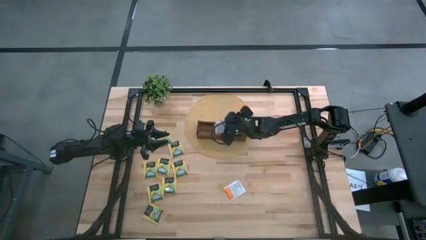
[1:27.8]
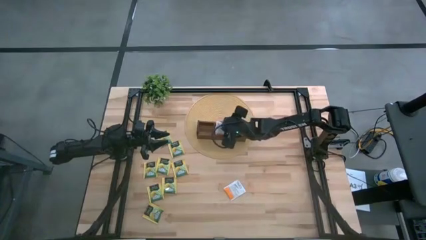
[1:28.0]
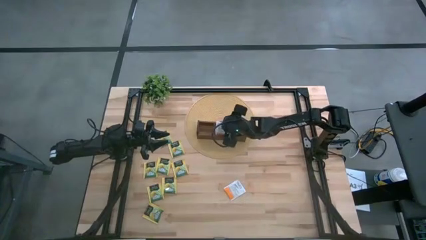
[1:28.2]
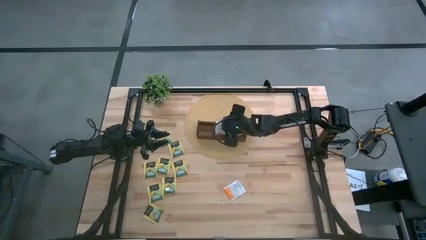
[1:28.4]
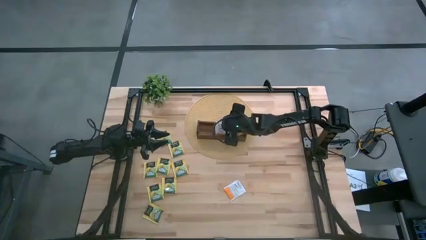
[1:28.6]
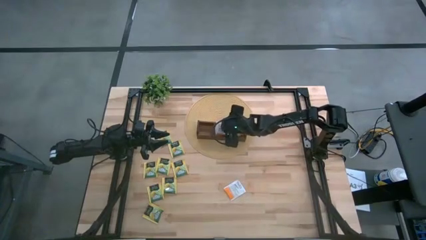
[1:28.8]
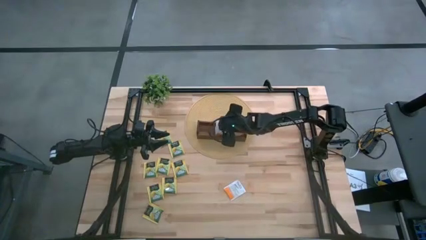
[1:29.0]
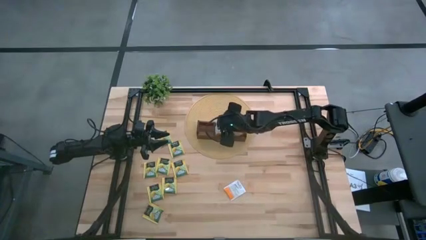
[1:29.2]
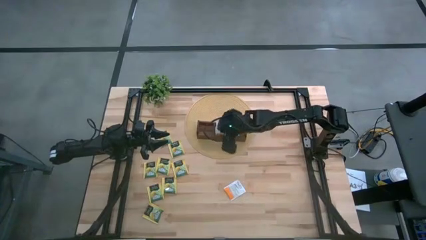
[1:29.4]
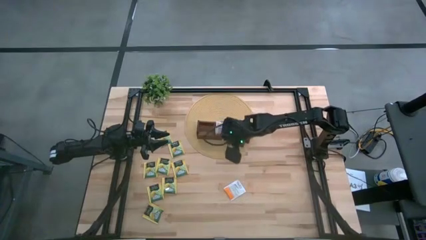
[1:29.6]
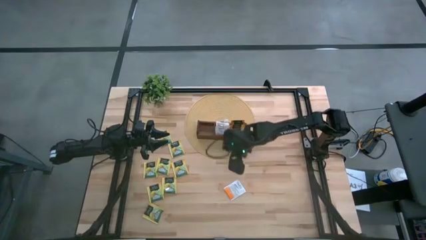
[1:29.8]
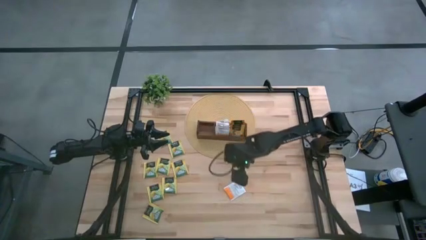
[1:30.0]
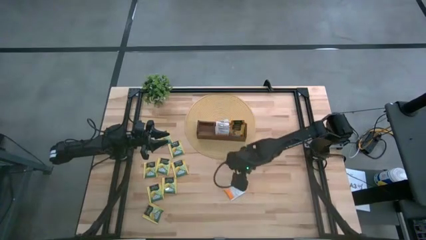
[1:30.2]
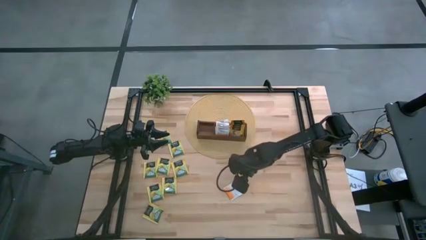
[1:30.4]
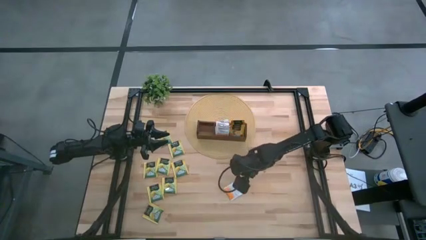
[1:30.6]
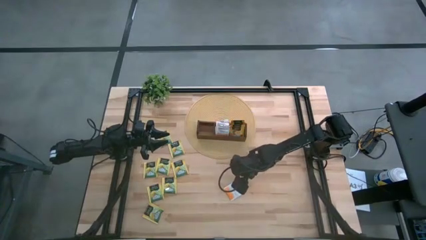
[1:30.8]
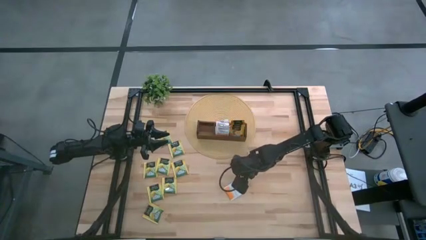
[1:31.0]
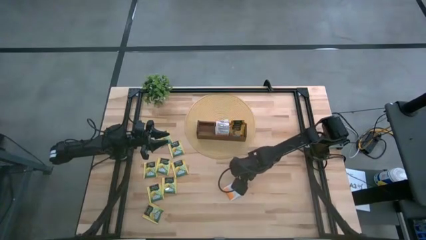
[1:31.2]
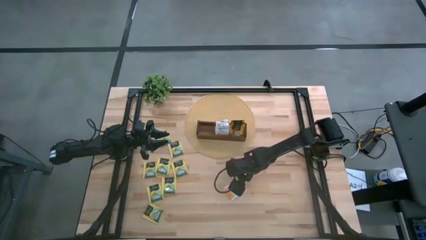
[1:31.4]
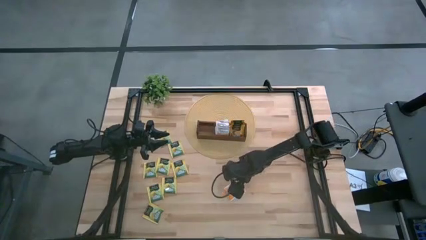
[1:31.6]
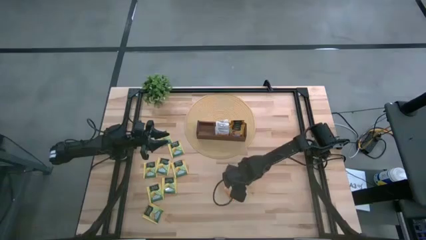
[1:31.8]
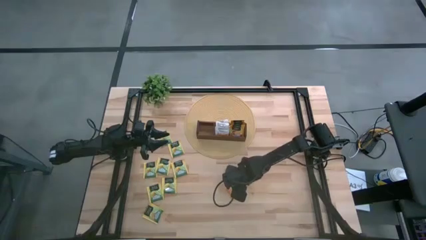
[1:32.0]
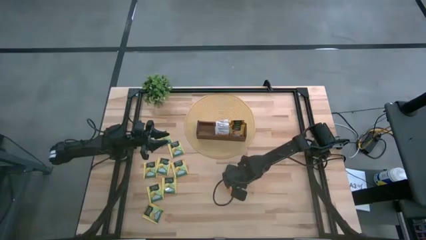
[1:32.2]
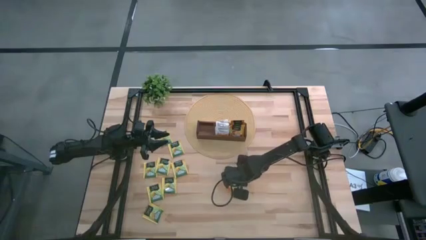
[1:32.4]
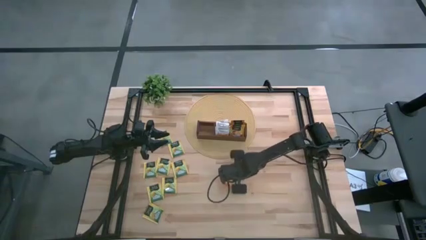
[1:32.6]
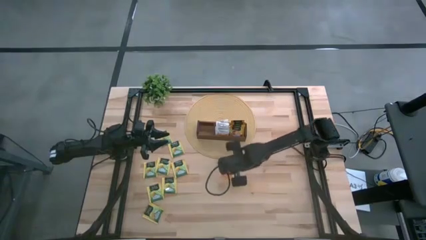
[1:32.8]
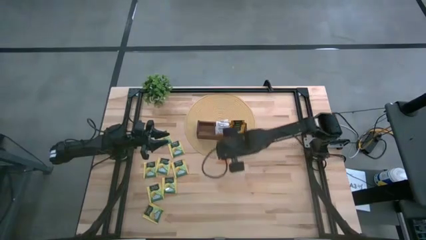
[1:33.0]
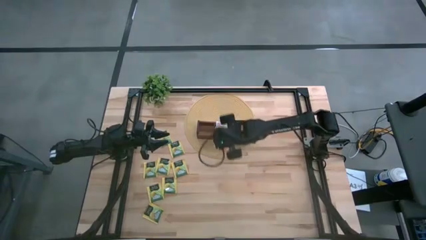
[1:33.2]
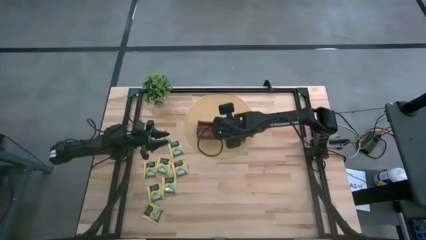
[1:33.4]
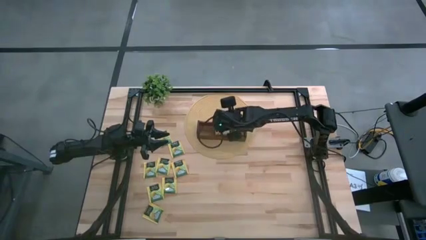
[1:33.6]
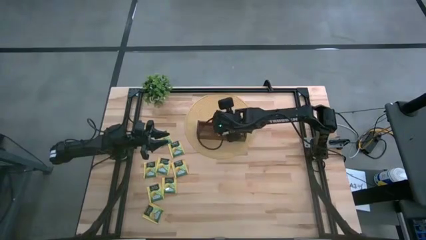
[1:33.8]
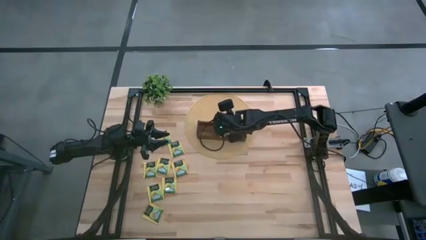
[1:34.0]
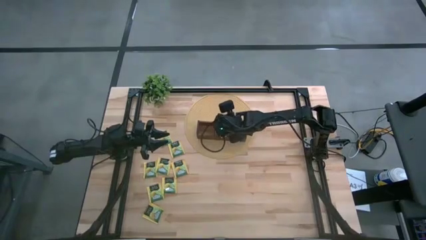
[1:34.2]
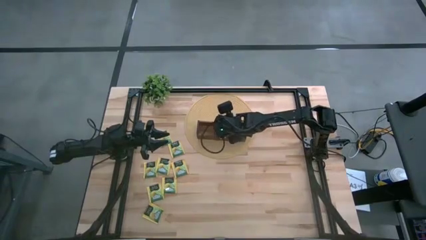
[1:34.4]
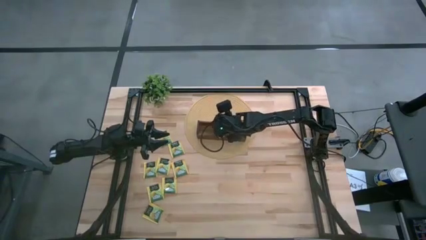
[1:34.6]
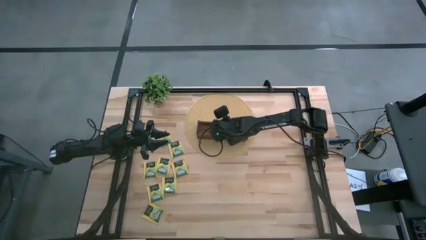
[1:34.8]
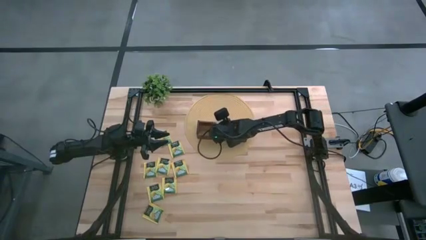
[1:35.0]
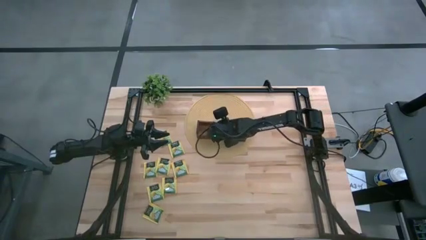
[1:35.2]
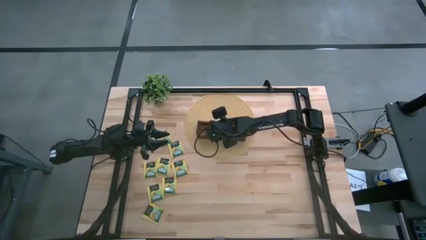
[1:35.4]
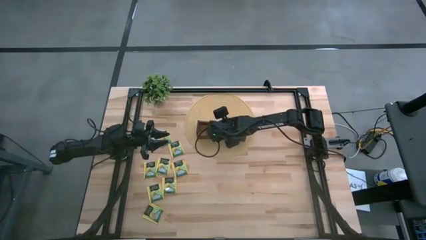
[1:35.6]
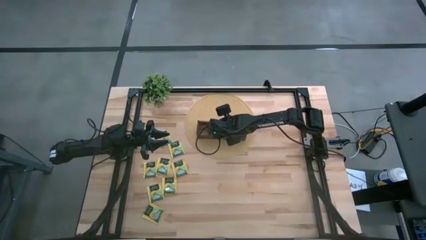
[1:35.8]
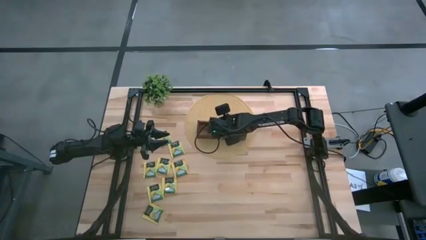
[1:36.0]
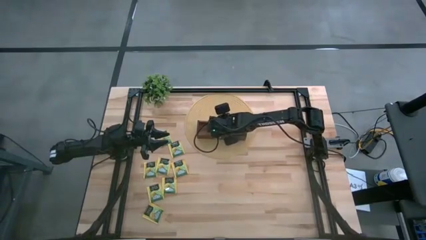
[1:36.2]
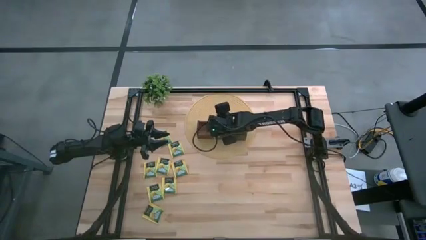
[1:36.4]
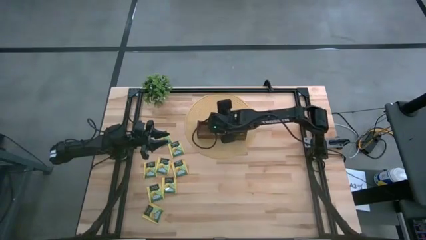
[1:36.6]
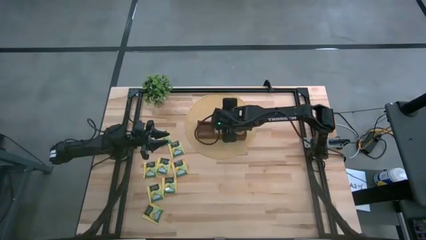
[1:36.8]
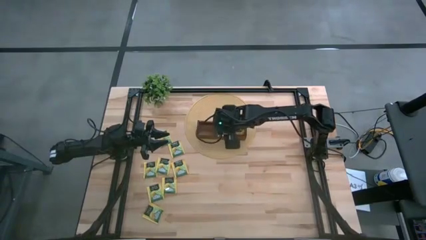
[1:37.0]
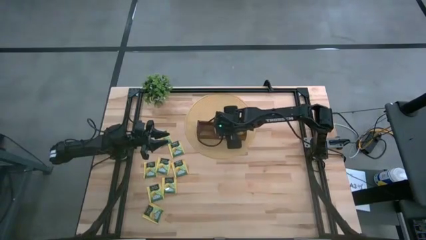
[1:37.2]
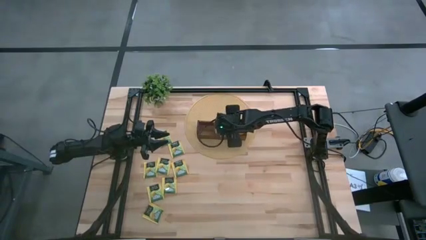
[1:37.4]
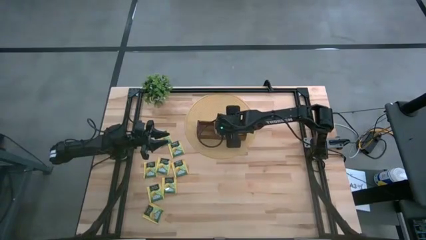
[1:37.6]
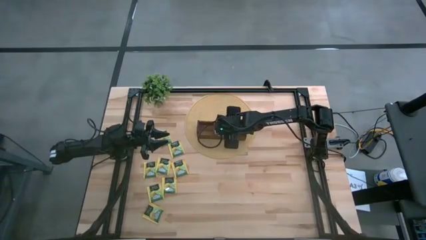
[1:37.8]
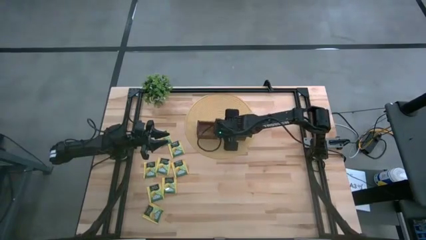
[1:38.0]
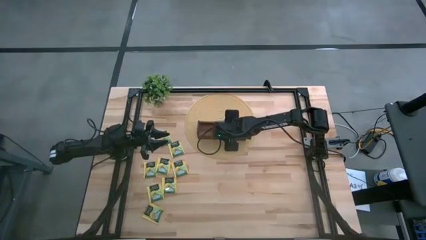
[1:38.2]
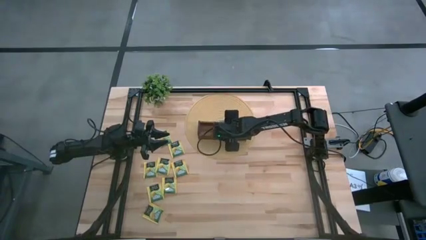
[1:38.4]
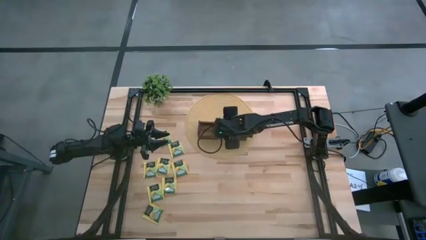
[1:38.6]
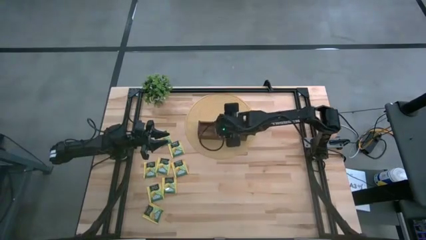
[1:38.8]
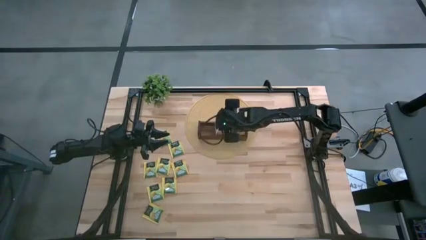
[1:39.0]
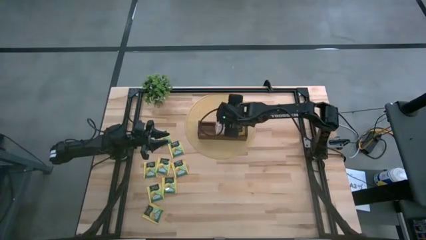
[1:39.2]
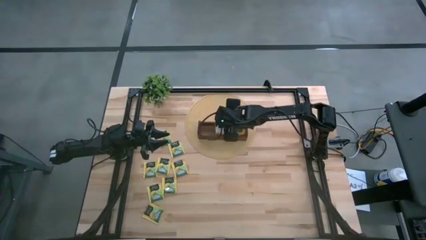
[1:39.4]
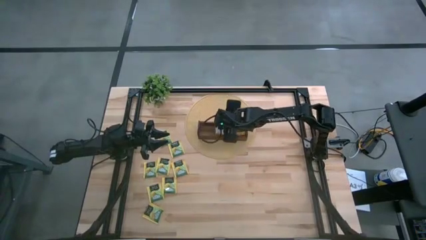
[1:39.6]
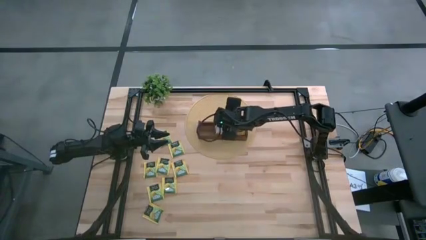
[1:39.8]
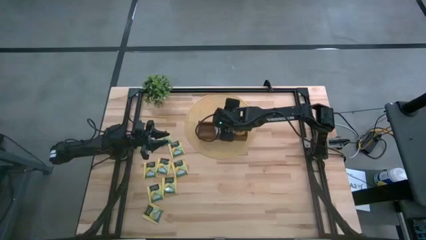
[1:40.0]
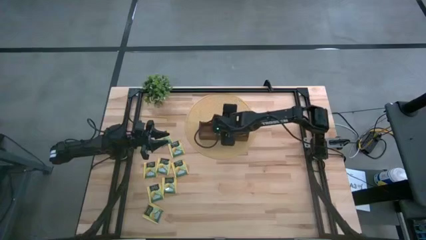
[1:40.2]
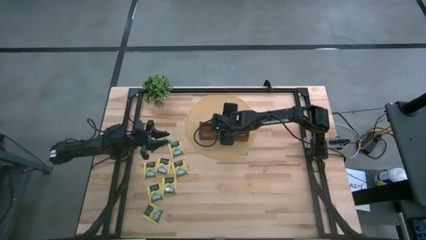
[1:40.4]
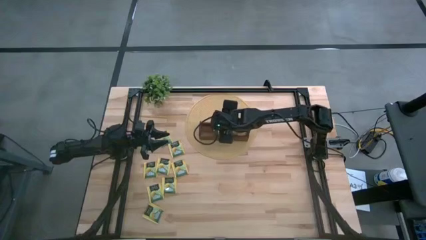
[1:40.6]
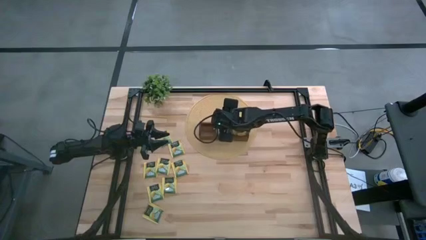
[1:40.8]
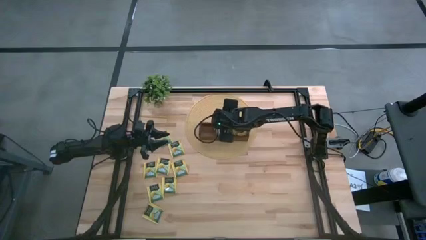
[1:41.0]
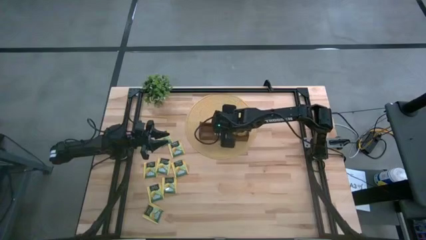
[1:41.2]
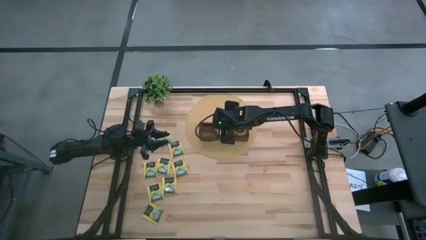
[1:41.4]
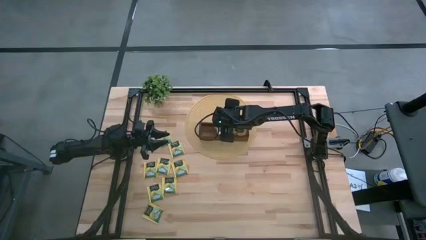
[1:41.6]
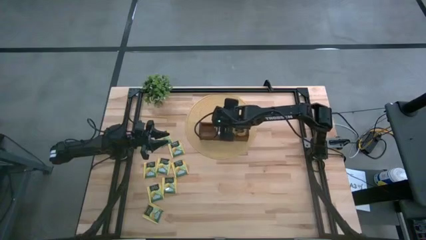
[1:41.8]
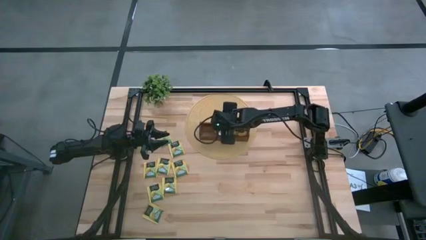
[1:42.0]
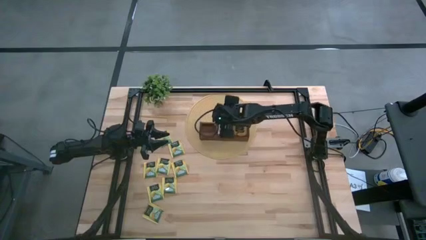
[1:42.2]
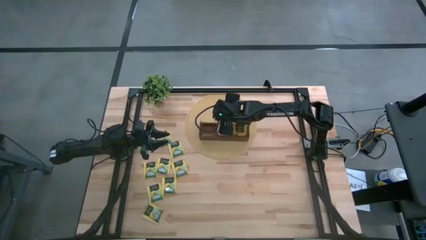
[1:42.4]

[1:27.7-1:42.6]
Task: Pick & Place Tea
Put the white tea bag into the middle section of the wooden organizer
